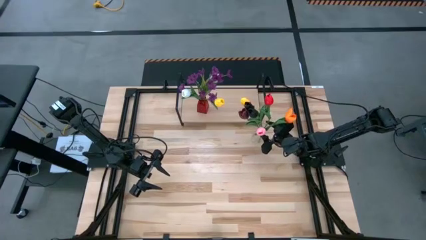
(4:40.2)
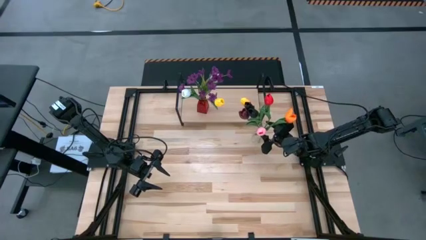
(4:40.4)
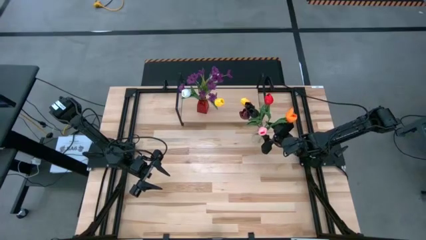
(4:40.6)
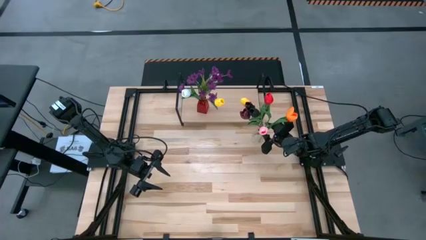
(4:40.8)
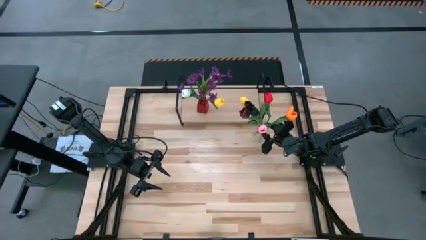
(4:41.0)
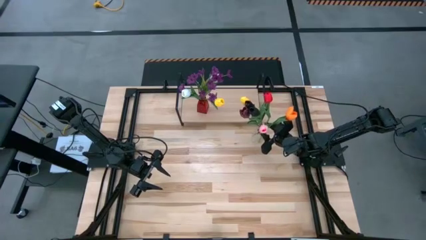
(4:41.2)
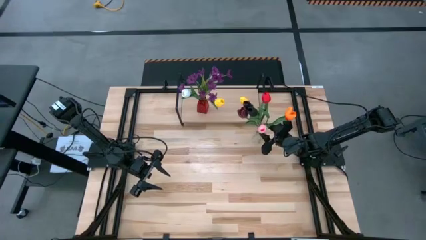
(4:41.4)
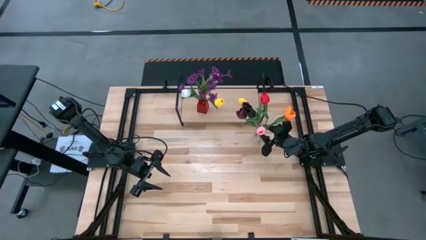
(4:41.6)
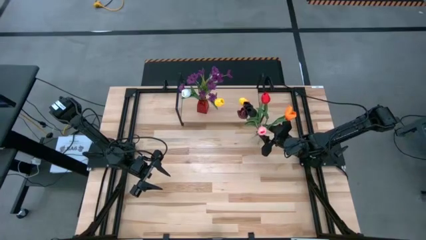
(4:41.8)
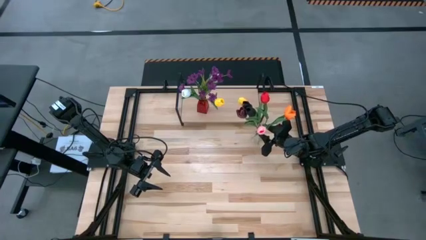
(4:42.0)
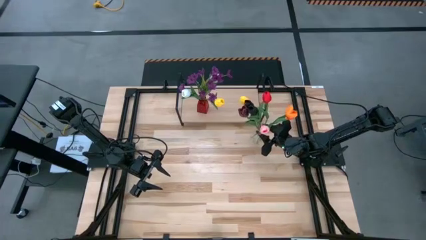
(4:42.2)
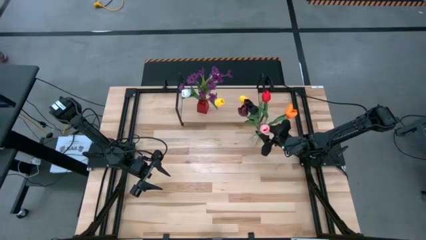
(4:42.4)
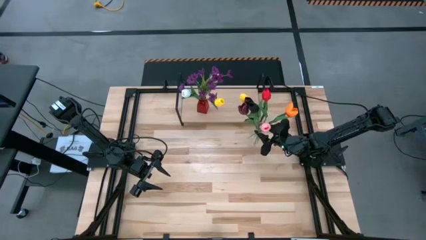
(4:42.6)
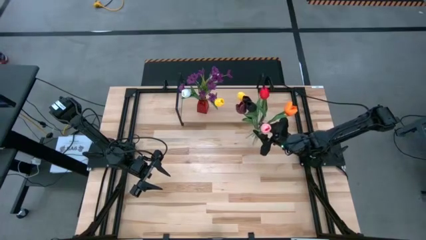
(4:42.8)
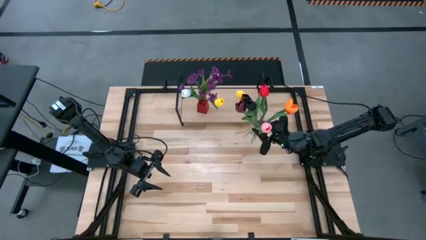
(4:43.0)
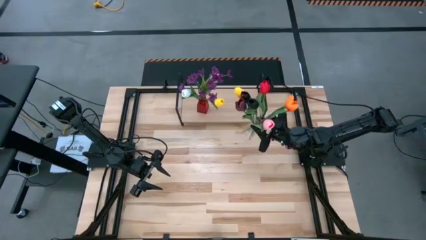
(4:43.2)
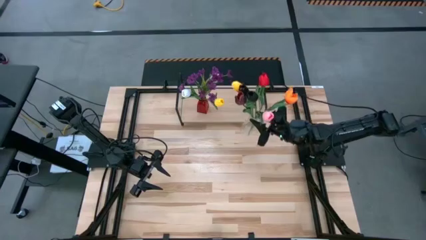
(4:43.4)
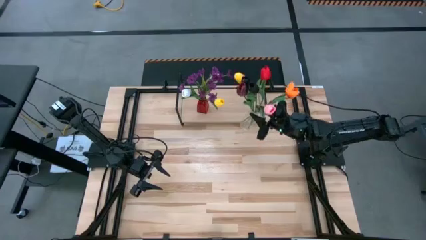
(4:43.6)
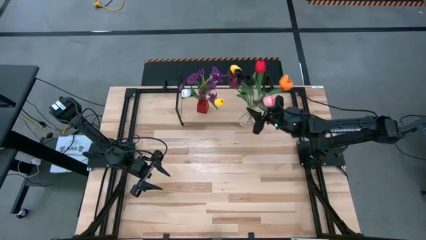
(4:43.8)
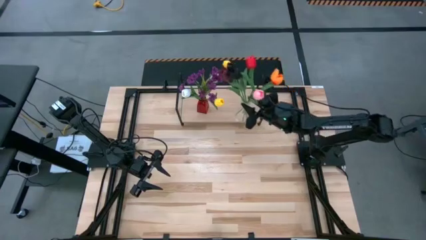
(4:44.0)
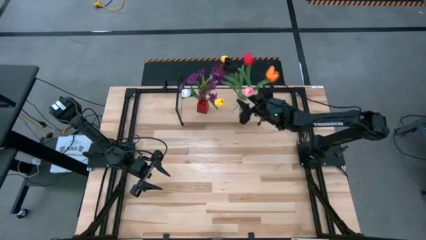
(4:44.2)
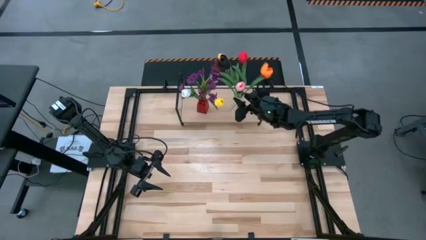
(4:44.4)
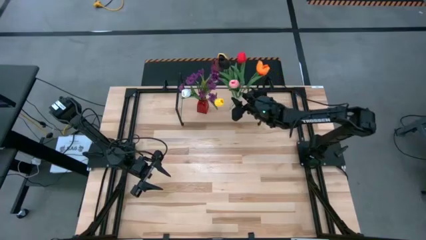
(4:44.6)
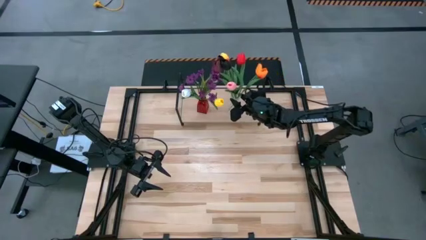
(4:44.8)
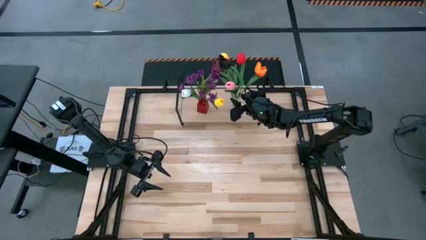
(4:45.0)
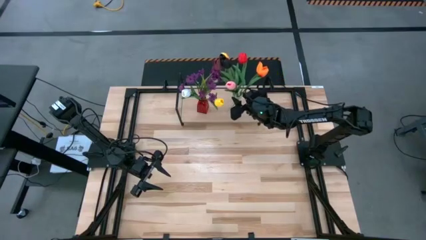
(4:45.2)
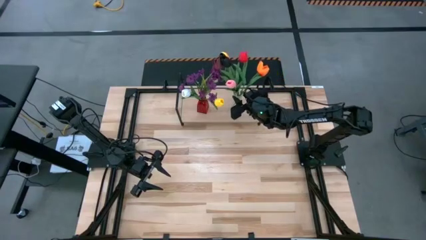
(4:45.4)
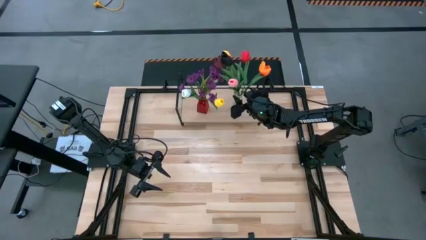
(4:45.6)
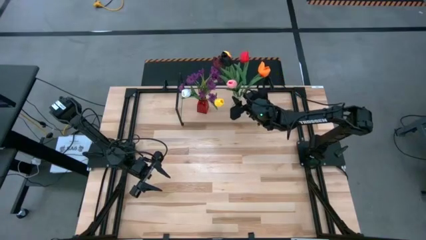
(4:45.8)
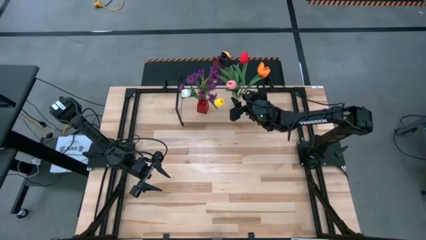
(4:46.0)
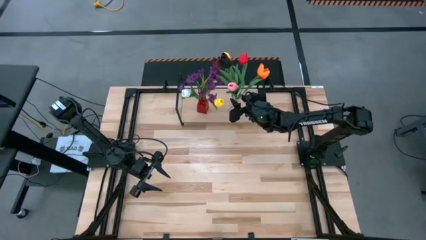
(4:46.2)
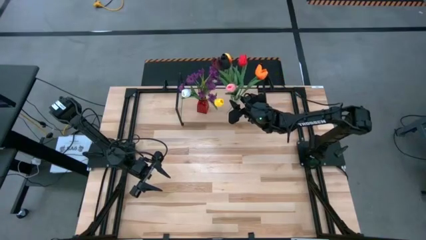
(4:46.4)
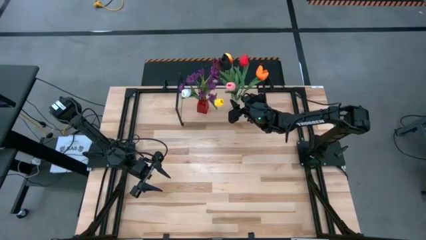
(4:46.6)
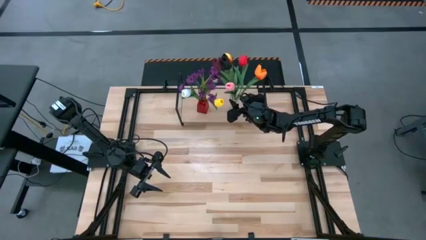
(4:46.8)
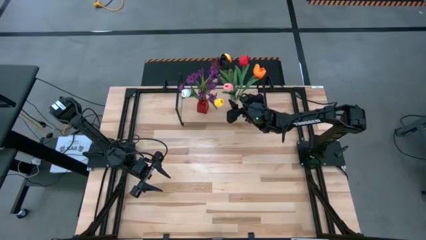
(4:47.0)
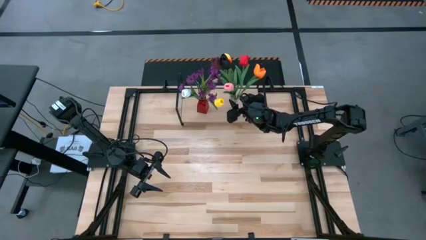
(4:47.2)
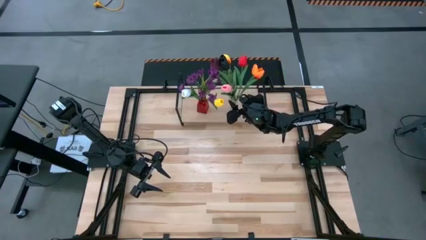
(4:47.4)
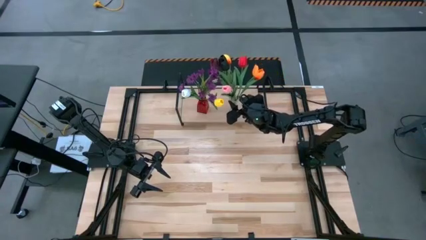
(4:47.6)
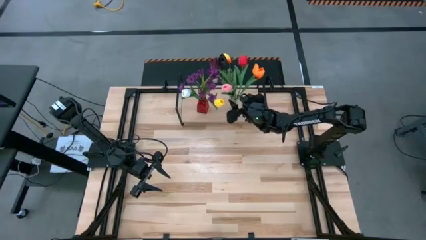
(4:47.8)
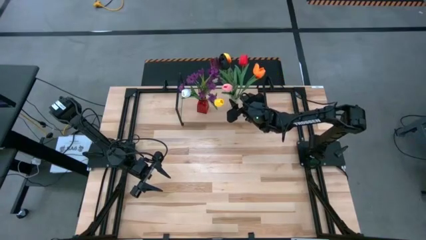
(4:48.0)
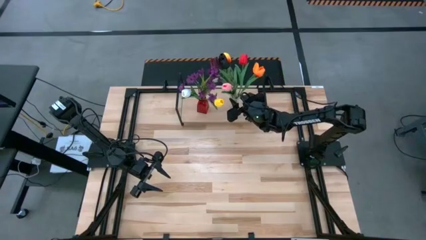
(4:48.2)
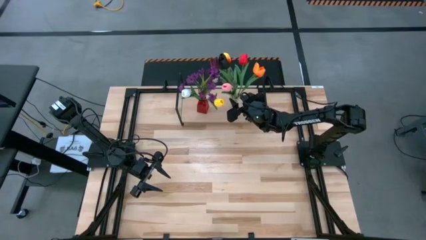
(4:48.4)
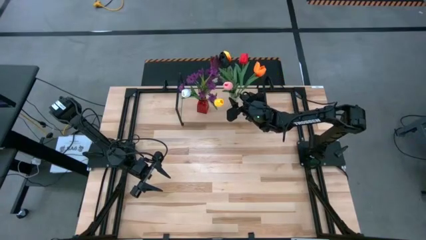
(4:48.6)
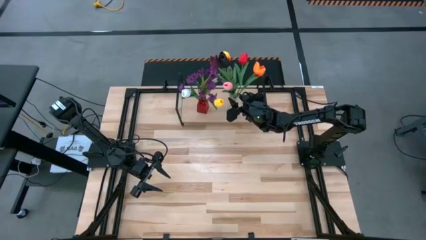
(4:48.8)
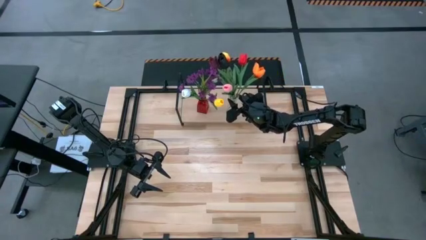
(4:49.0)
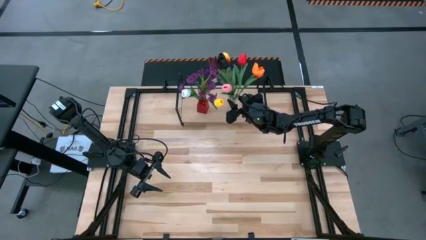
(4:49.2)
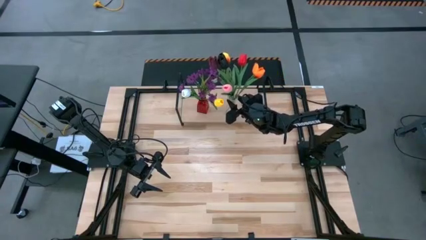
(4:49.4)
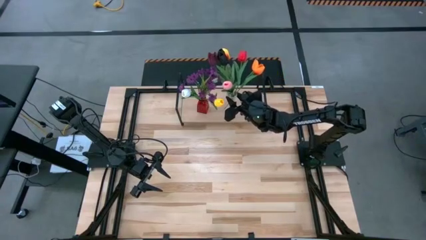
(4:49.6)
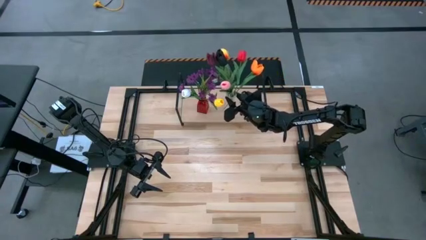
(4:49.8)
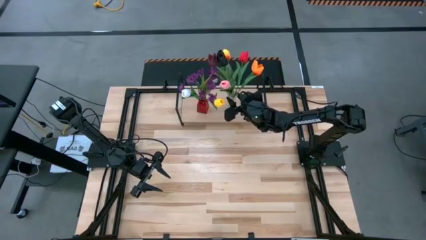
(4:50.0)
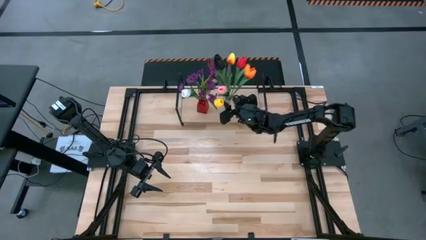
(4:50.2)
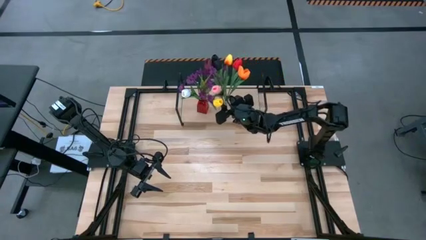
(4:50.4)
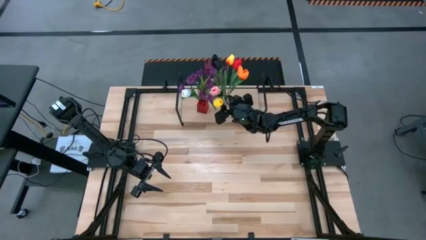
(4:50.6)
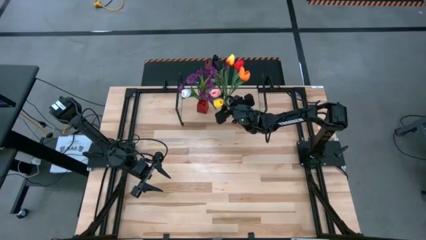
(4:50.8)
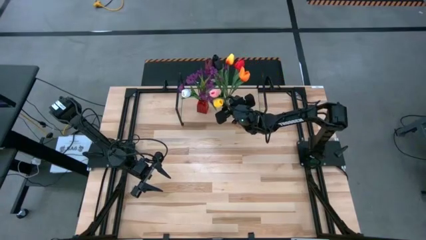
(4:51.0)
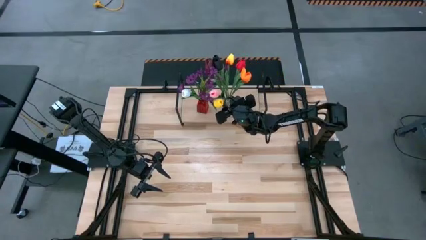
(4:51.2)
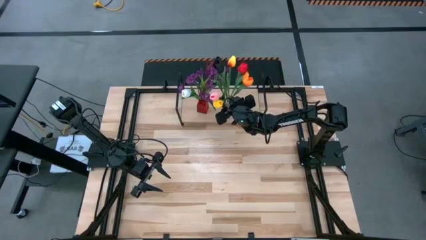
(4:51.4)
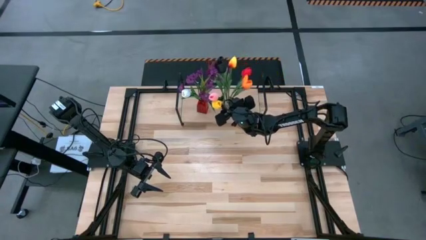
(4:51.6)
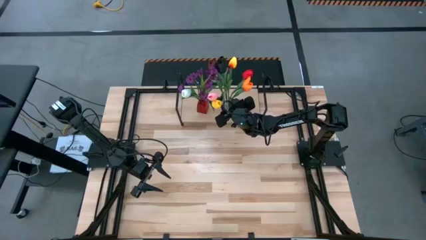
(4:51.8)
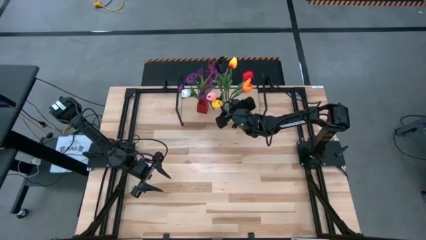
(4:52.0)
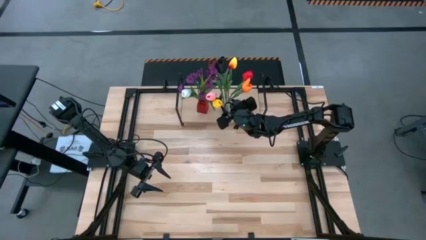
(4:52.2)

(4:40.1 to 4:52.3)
Task: Pick and place flowers into a vace then onto a shelf
Put the transparent vase on the shelf

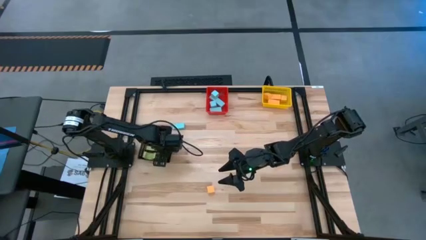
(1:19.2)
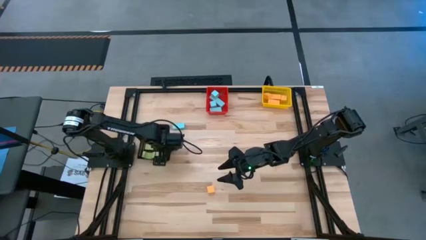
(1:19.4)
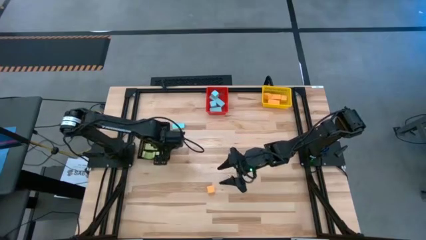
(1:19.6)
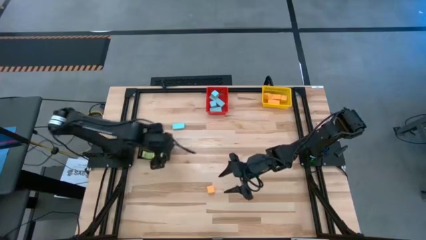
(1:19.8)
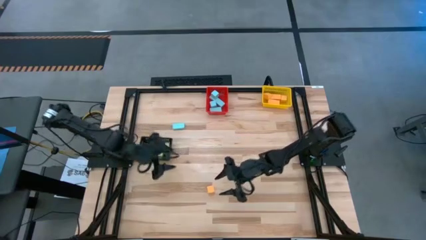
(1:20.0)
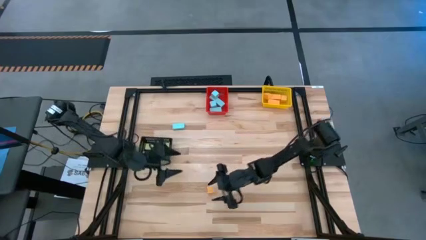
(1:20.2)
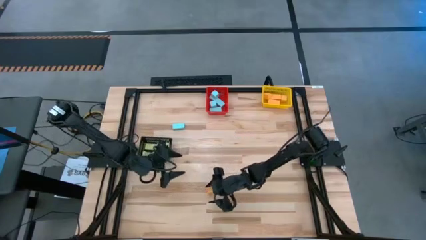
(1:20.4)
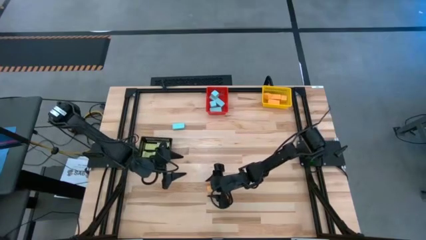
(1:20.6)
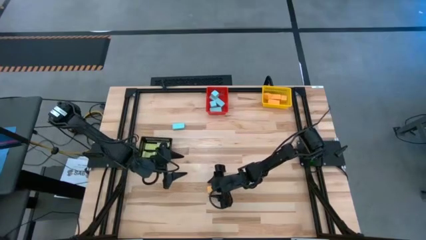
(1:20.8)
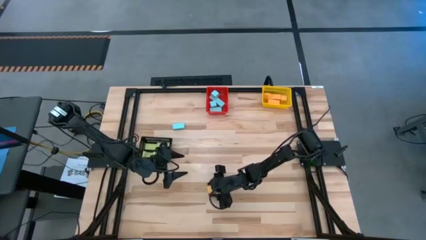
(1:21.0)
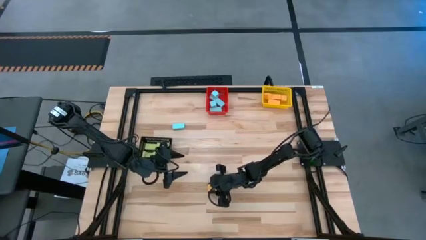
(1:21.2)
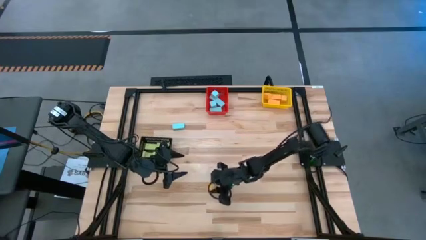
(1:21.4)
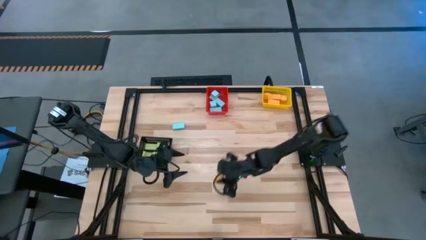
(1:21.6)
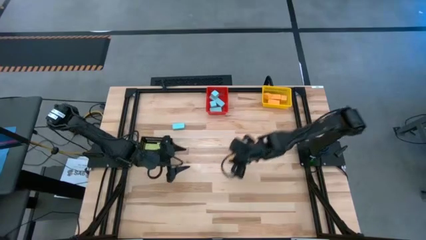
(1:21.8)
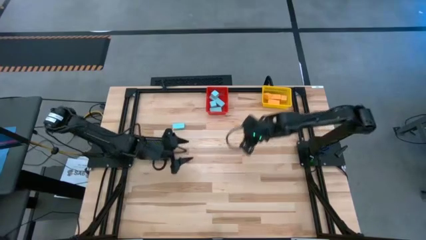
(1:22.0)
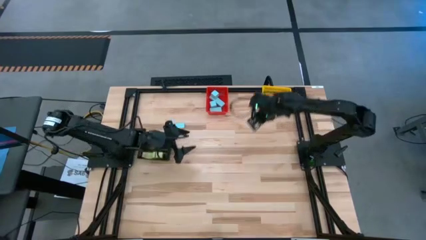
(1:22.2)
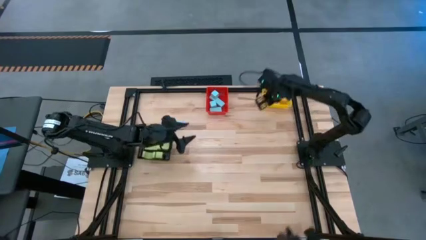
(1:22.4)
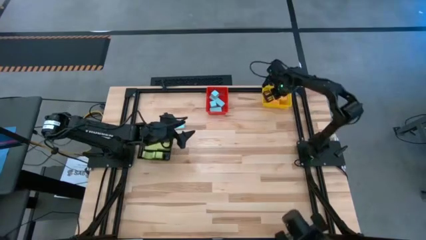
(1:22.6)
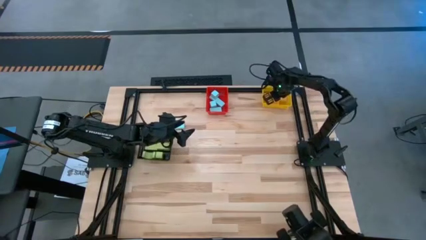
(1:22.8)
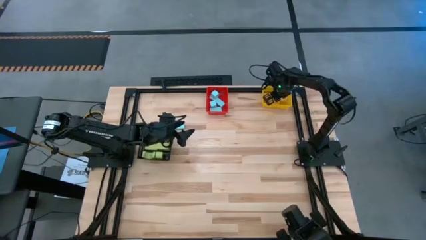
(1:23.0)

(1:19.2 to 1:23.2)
Task: Sort & place blocks by color
Put the yellow block into the yellow bin
